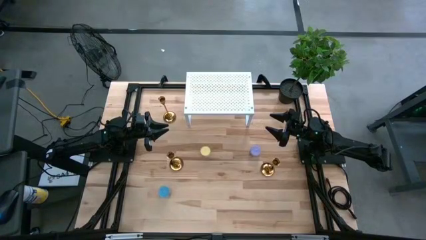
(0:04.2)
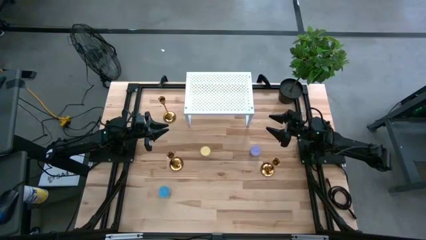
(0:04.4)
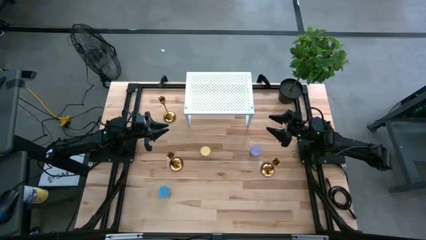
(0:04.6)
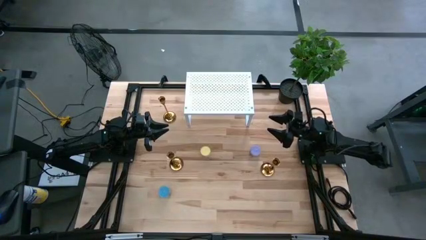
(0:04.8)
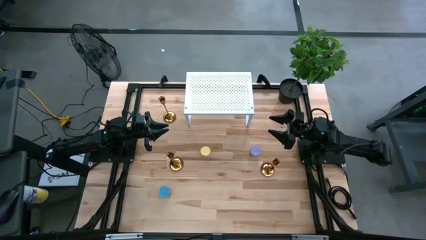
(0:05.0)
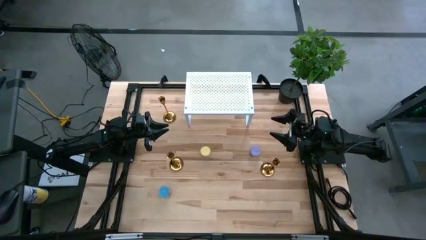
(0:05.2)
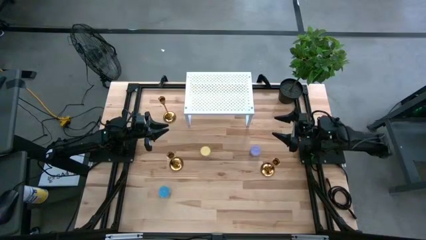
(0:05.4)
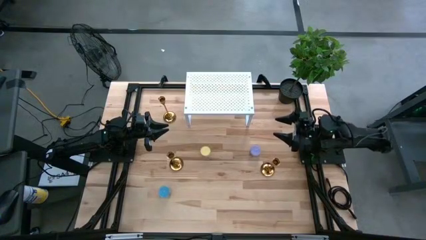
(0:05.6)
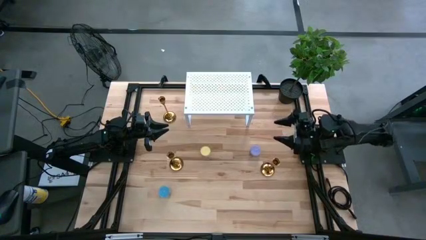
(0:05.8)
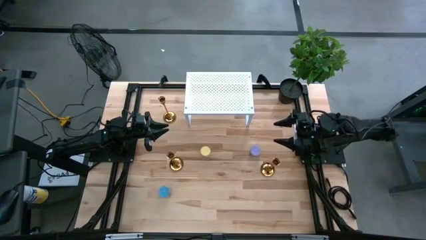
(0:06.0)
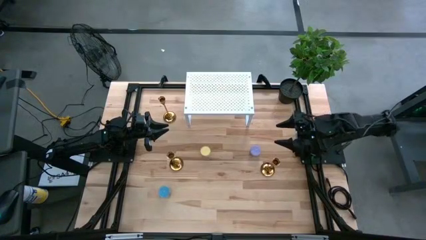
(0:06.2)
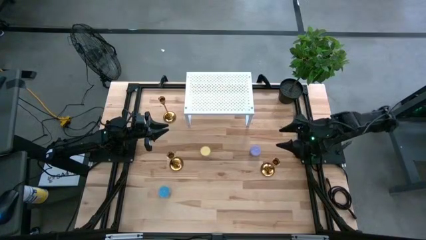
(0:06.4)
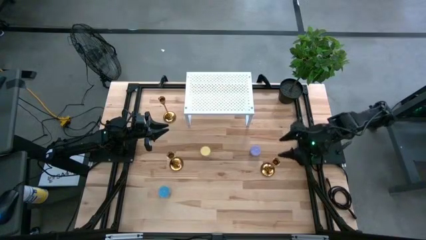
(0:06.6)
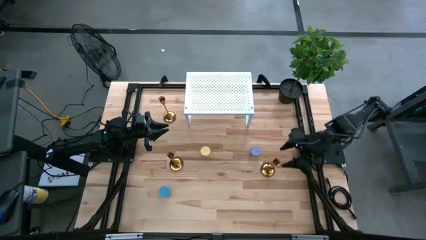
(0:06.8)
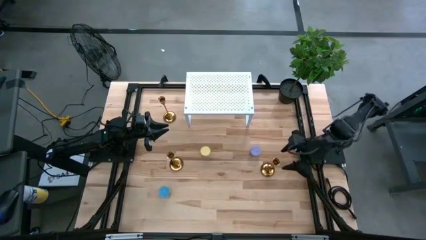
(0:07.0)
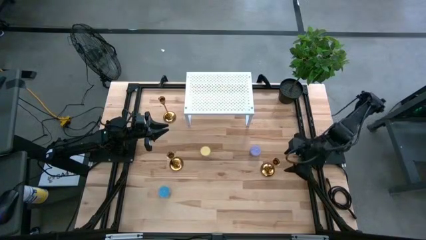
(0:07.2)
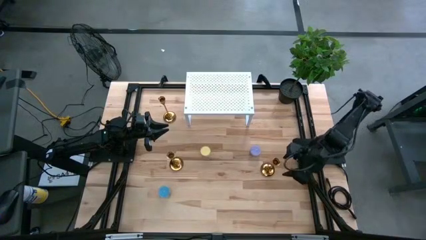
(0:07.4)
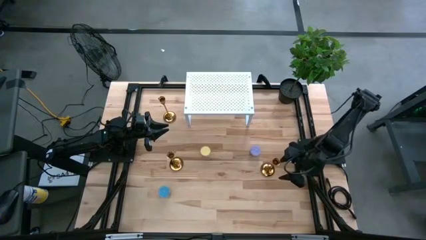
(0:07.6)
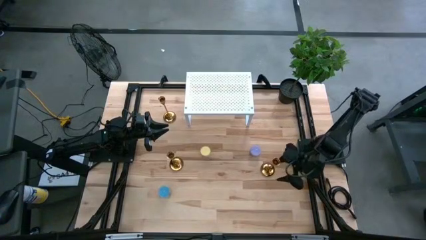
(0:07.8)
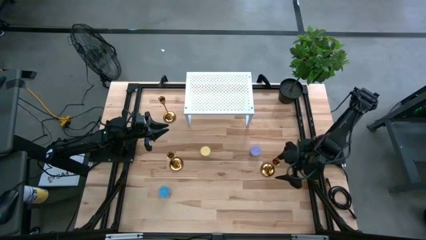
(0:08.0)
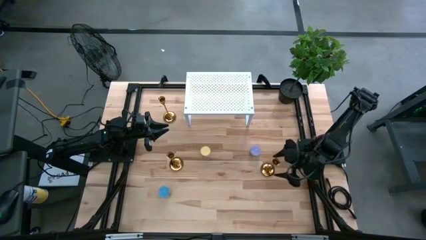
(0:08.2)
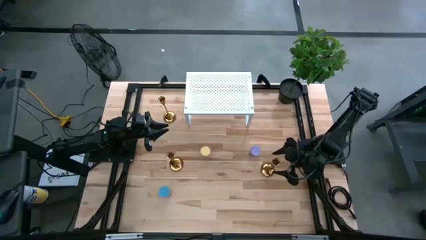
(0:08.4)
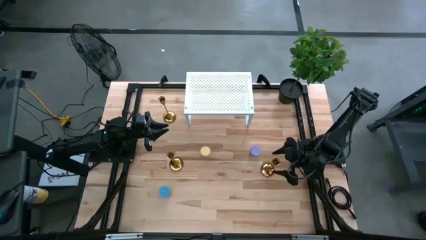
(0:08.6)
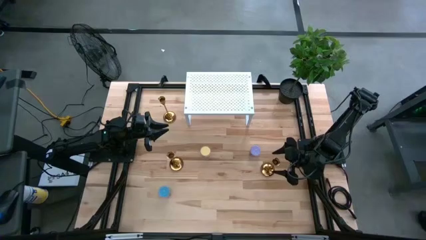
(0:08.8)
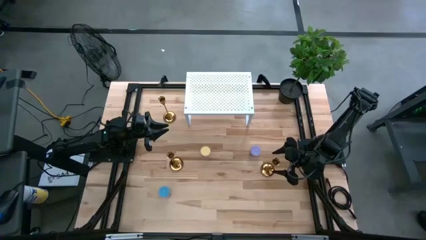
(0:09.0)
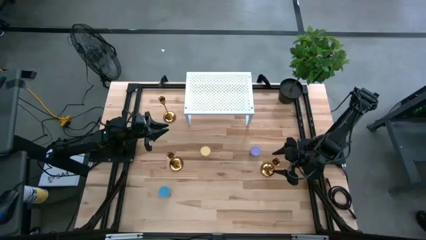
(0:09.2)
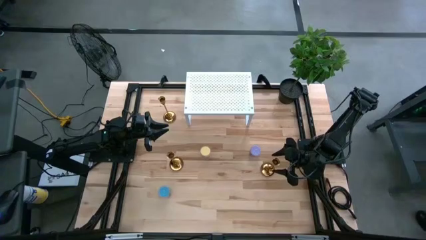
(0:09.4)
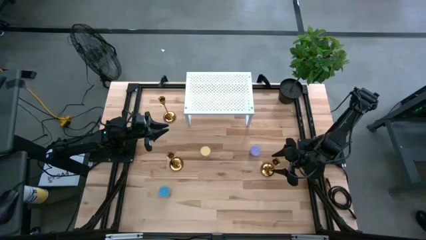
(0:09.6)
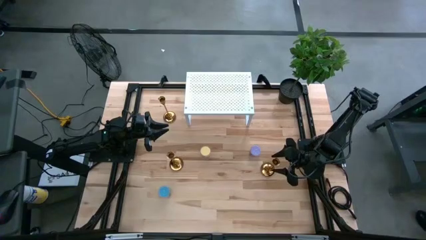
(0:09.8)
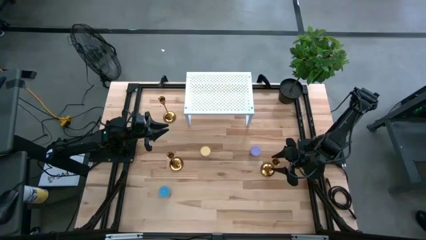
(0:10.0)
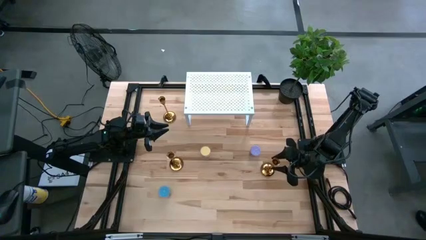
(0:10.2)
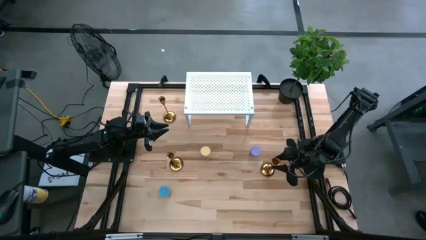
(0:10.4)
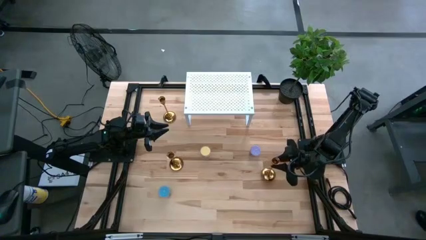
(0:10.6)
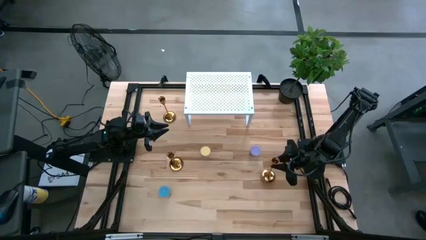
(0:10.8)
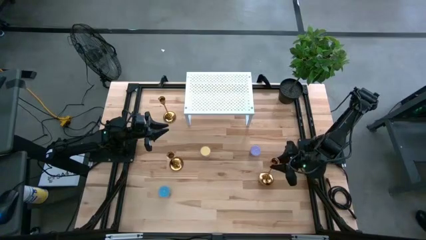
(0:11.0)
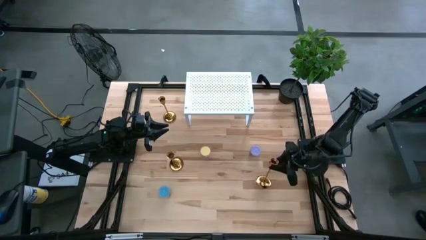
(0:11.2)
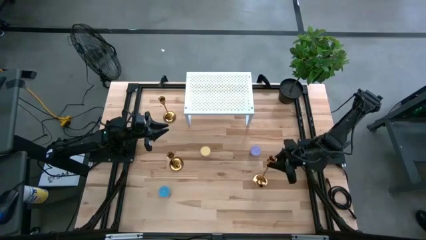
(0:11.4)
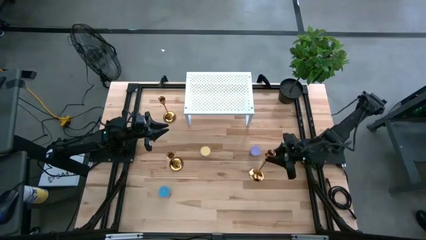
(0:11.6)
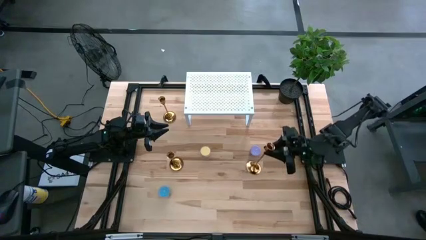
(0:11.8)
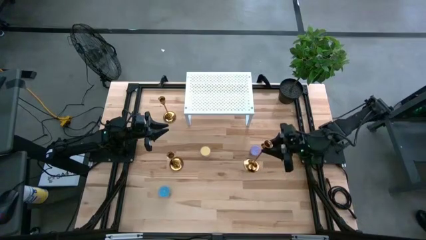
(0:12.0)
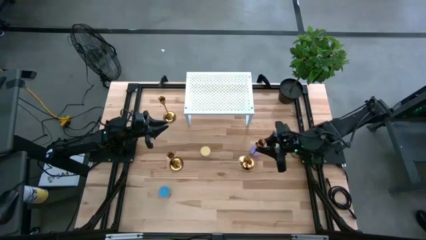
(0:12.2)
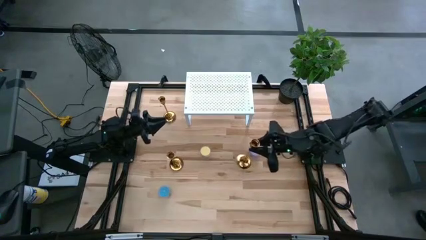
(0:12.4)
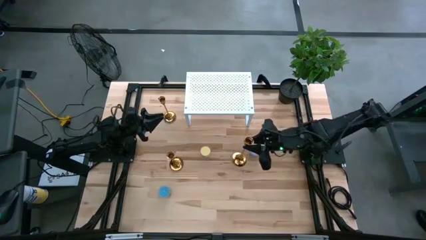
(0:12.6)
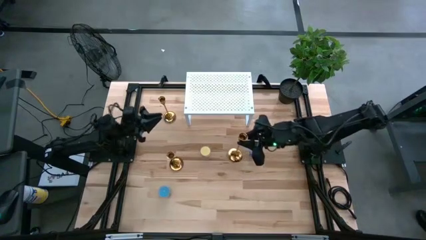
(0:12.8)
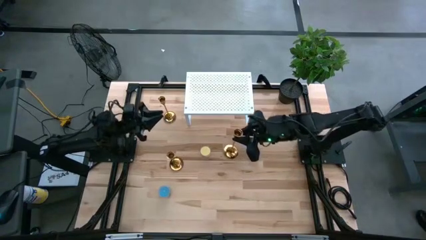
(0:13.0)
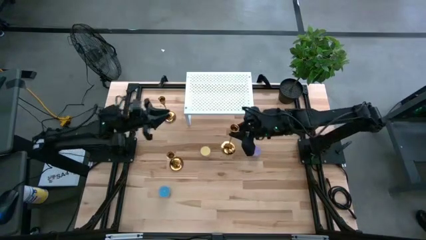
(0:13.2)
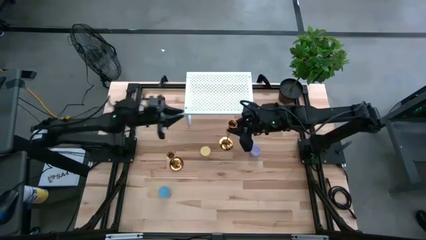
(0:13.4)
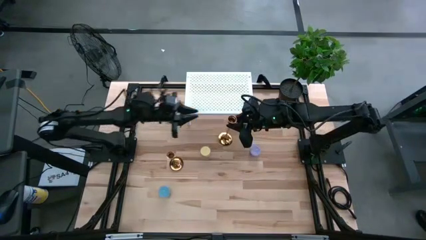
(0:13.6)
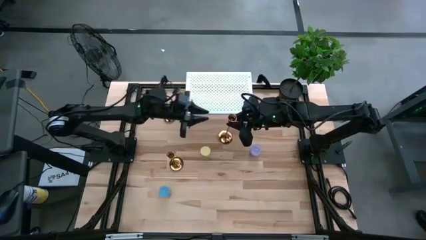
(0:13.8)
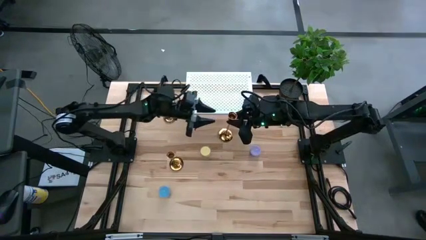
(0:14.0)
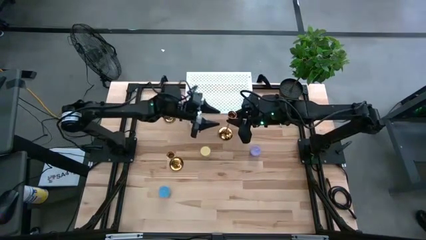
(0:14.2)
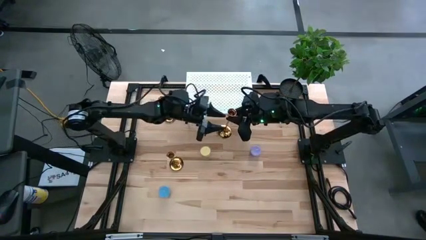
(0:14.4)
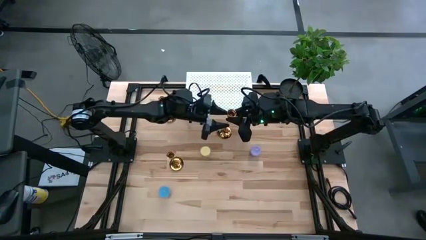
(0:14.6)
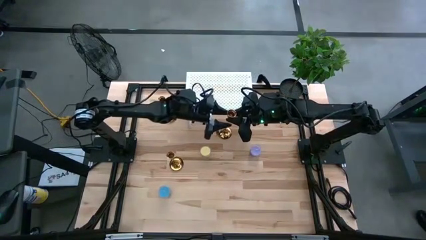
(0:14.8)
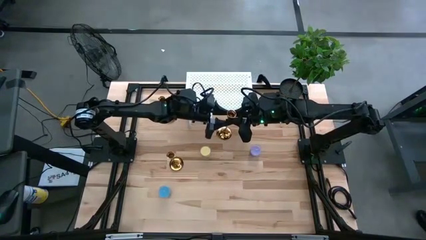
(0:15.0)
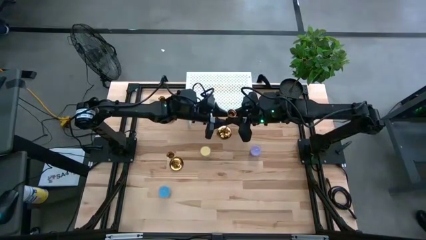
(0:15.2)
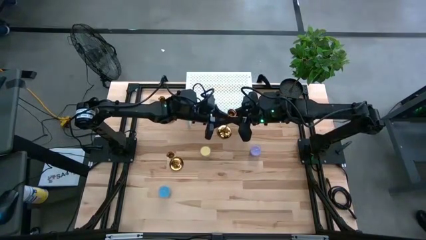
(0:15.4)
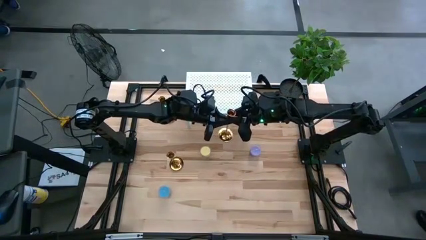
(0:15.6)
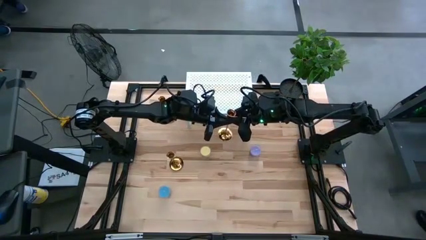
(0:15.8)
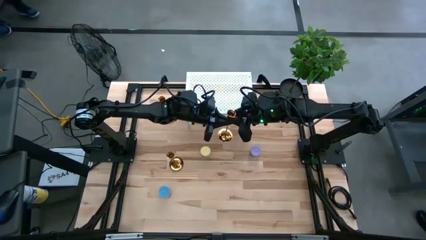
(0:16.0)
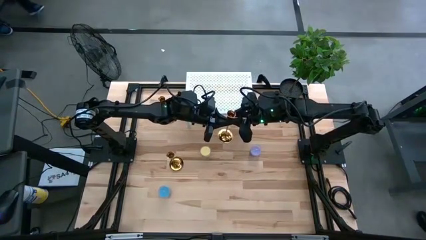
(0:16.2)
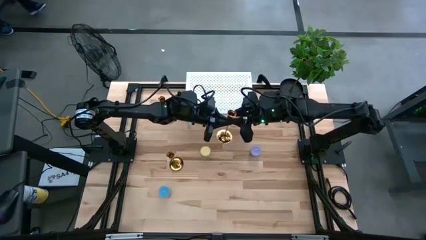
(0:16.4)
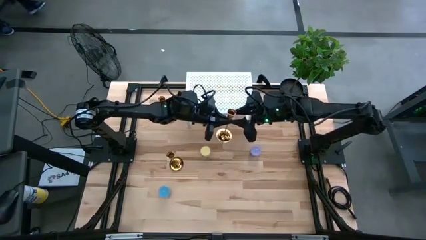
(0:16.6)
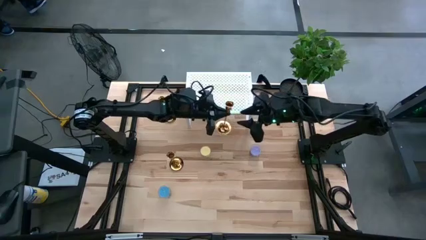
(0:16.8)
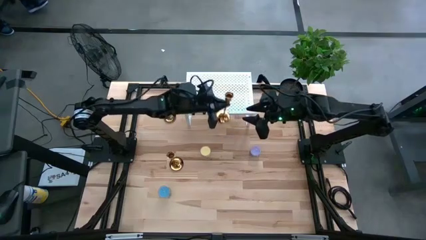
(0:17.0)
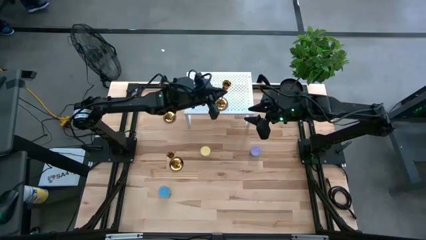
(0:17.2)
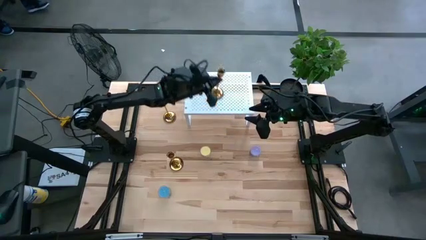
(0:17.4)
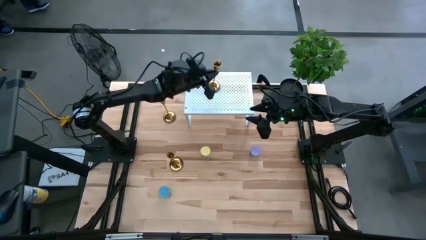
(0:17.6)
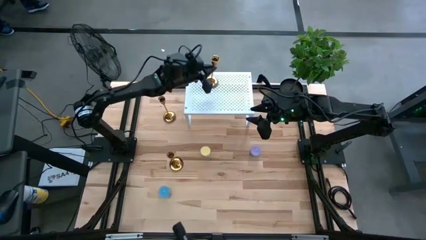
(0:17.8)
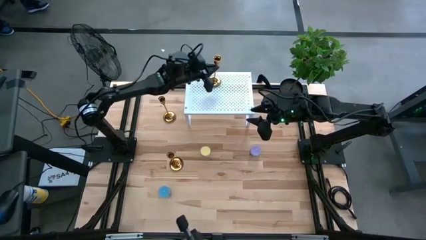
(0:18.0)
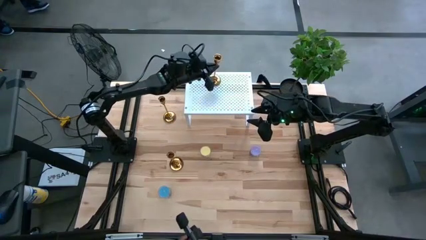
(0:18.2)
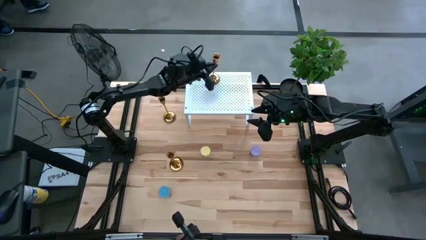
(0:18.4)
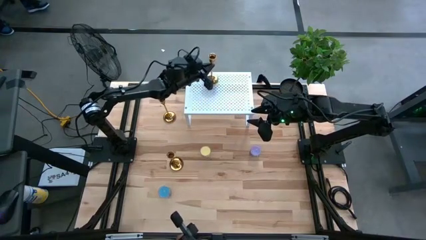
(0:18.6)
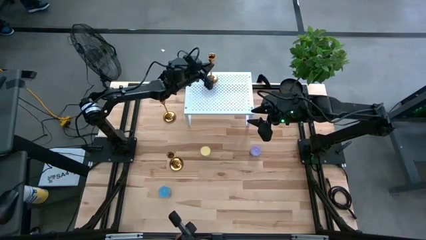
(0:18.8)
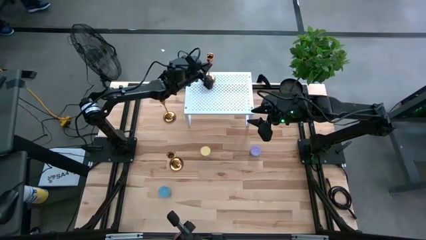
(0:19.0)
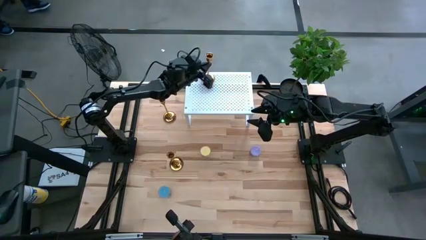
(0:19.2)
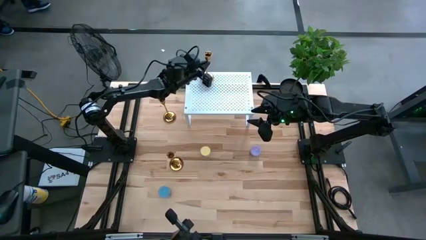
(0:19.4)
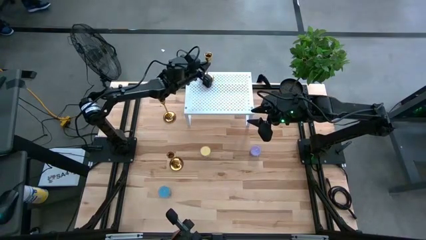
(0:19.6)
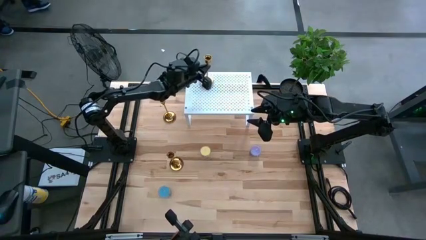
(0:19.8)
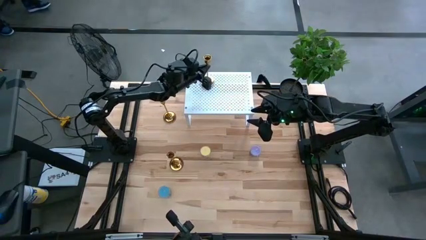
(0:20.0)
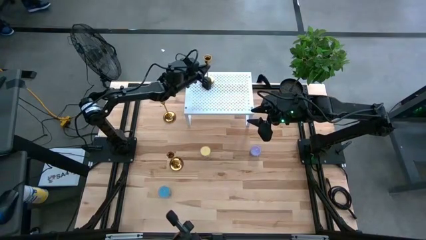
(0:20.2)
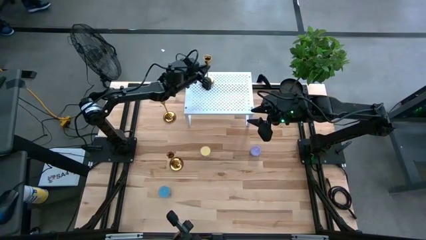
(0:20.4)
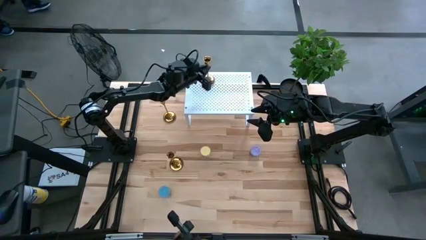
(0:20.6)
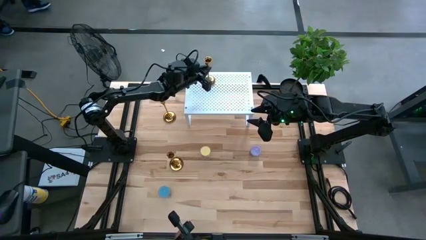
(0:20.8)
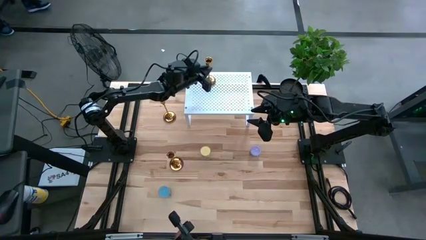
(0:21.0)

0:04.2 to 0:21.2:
Task: Pick & Place candle stick holders
Put the bottom right gold candle holder on the shelf
